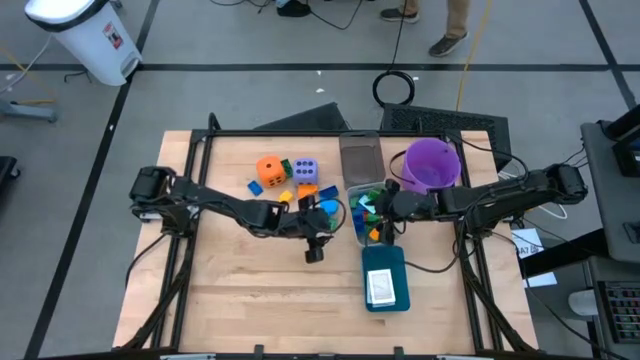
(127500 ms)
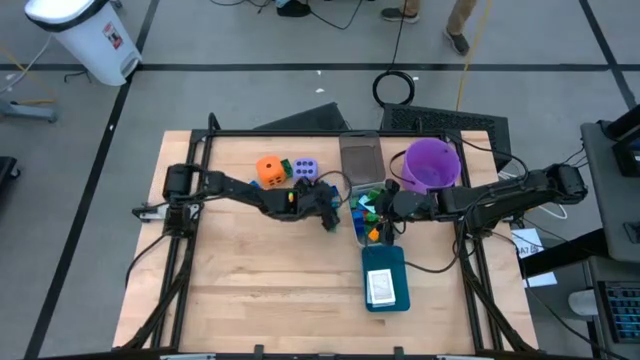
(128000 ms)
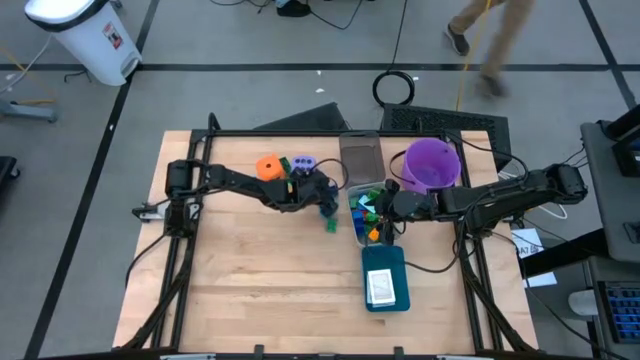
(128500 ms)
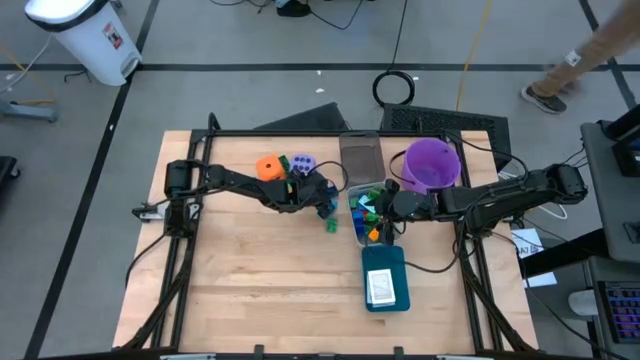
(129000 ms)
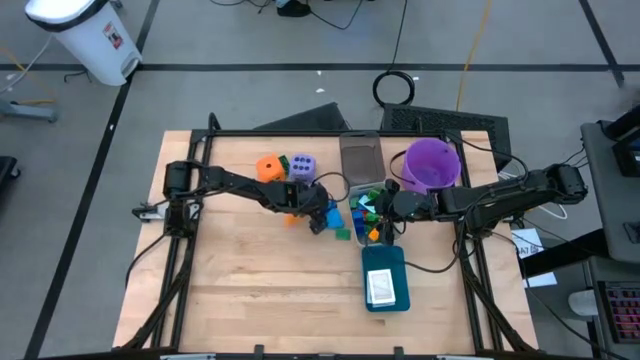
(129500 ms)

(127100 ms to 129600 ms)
Task: Pick & Place Toys
Adjust the game piece on the table

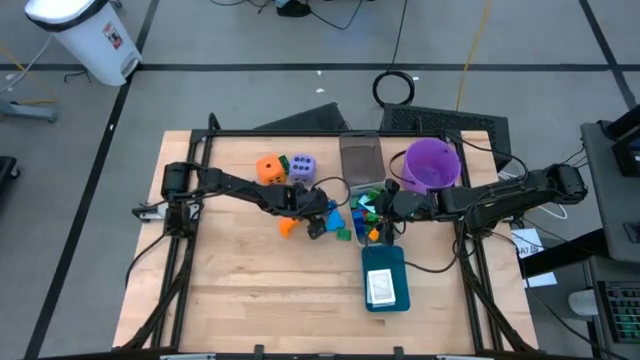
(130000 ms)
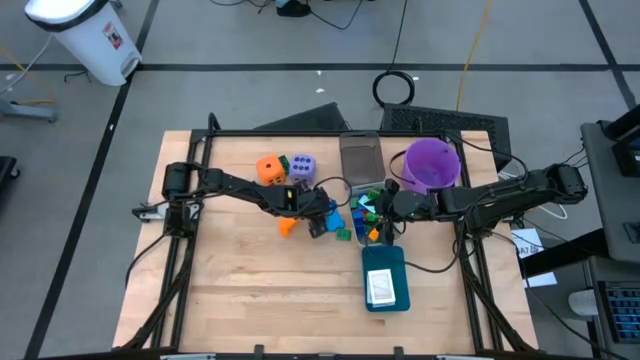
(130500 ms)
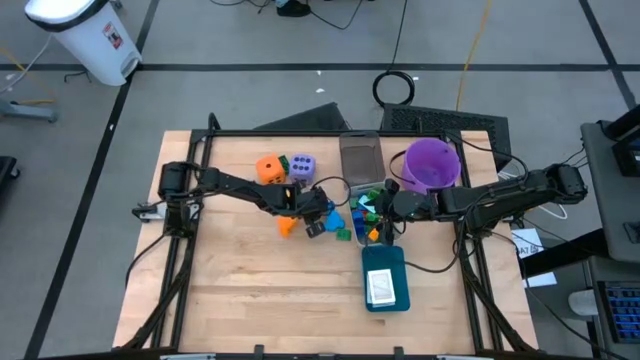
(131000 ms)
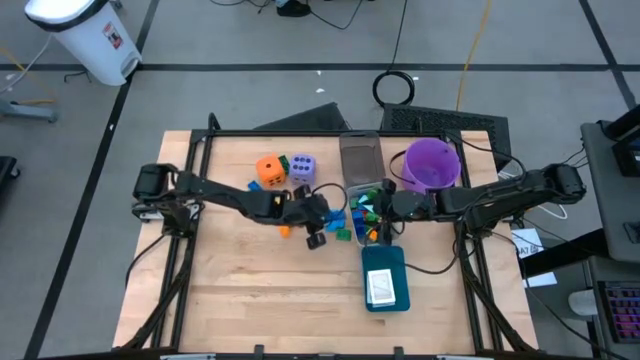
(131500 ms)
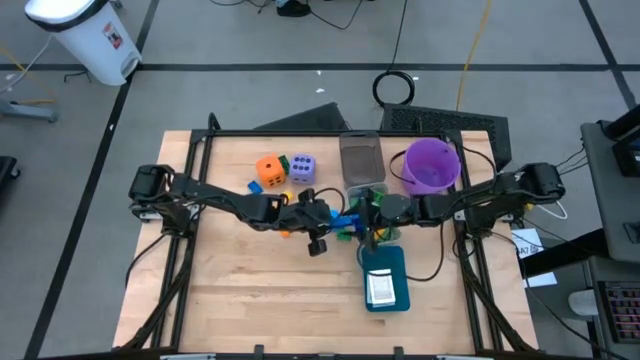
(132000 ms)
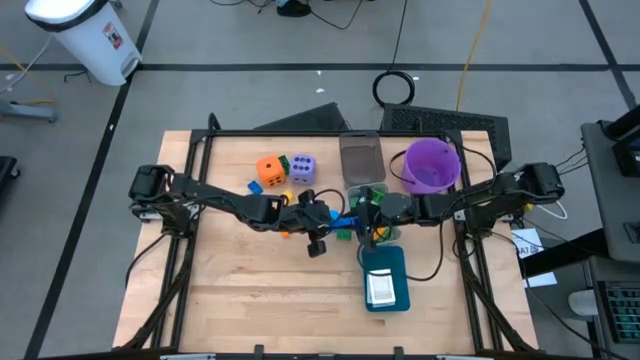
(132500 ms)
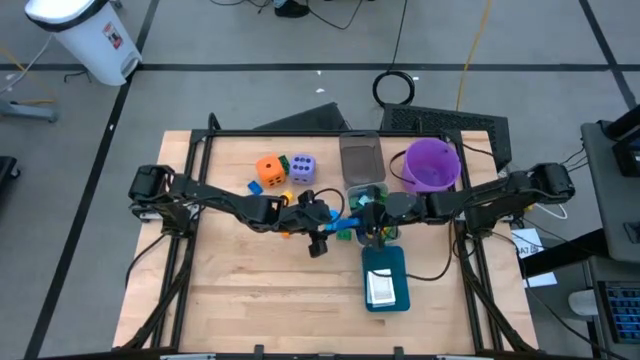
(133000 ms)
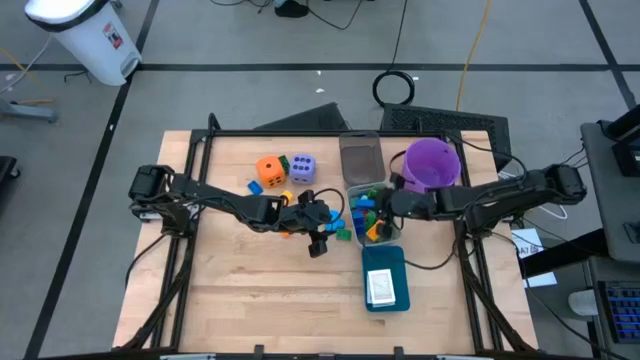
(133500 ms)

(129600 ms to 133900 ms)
Put the dark blue game piece into the gray bin

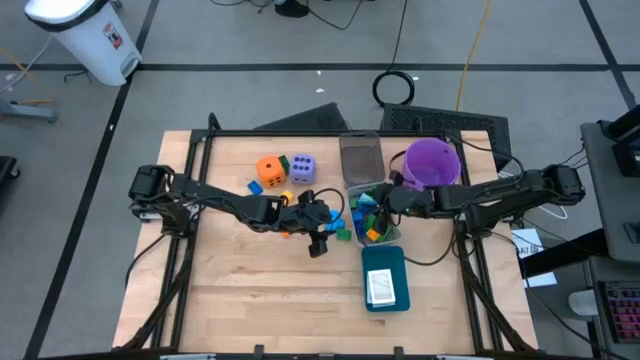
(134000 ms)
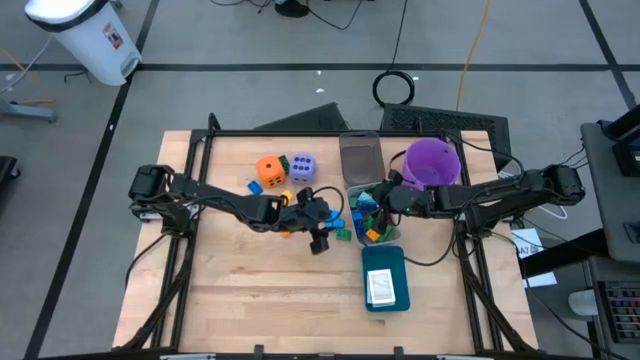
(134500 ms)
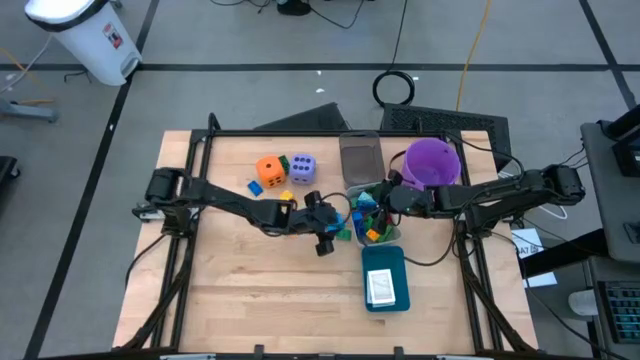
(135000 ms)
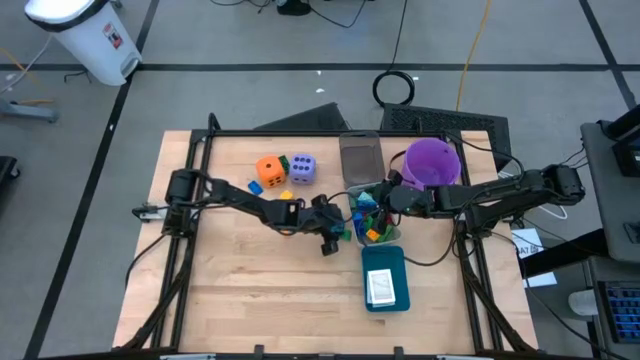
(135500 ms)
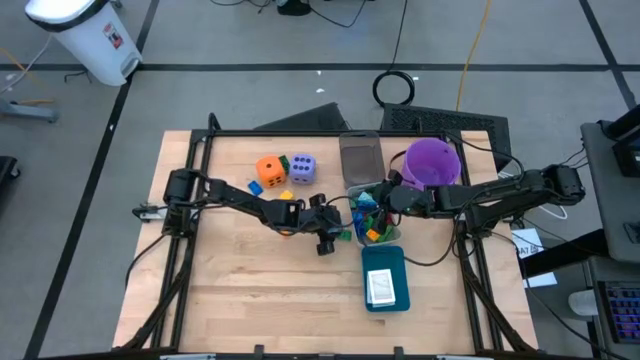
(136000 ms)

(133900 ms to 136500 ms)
Adjust the blue game piece on the table

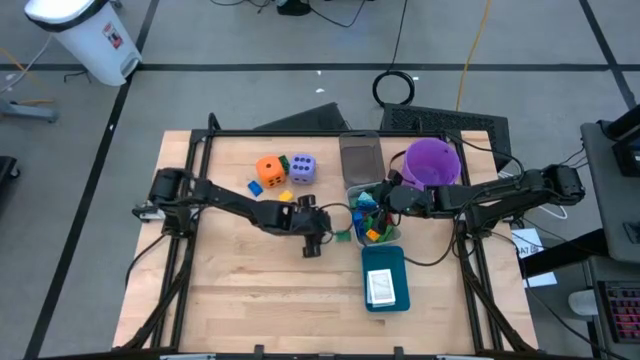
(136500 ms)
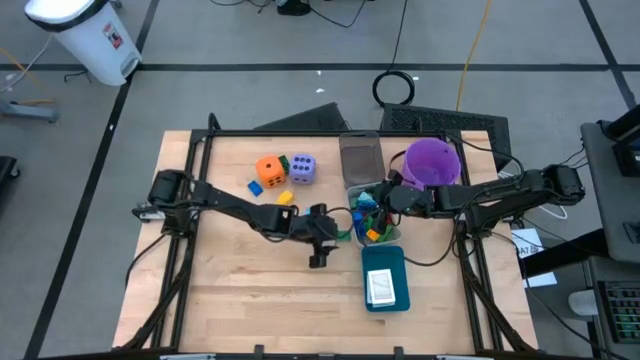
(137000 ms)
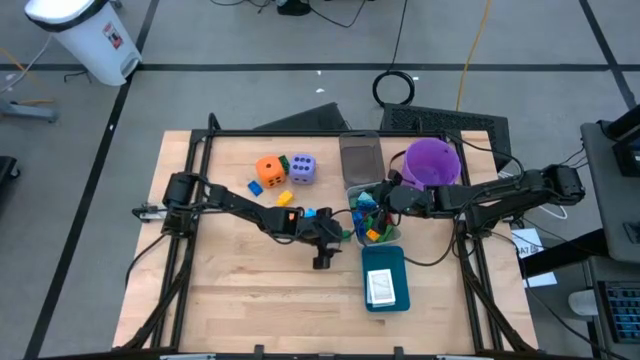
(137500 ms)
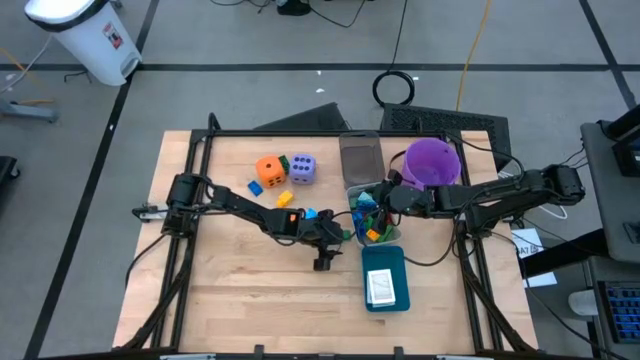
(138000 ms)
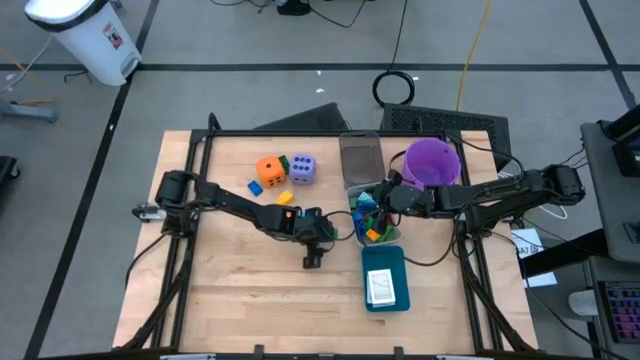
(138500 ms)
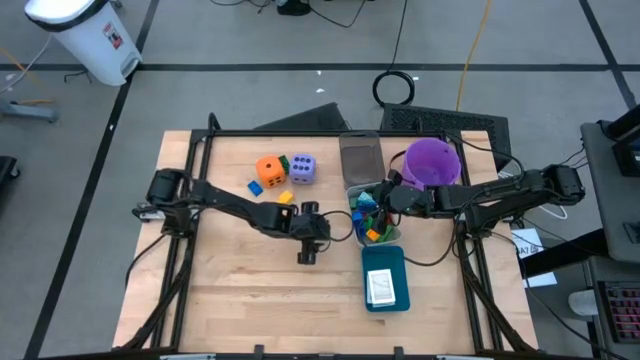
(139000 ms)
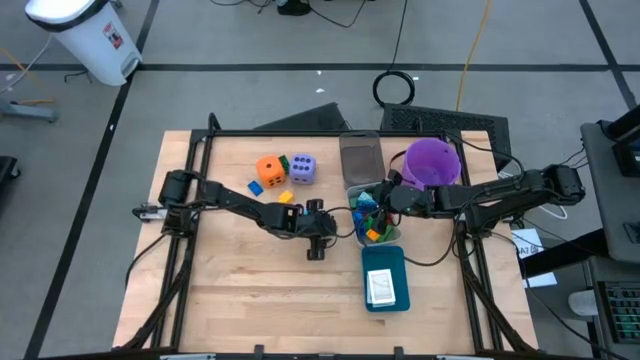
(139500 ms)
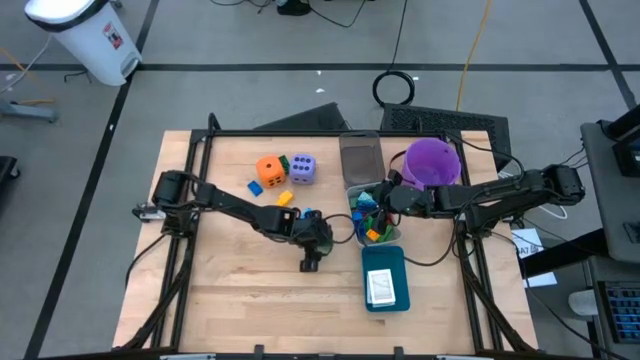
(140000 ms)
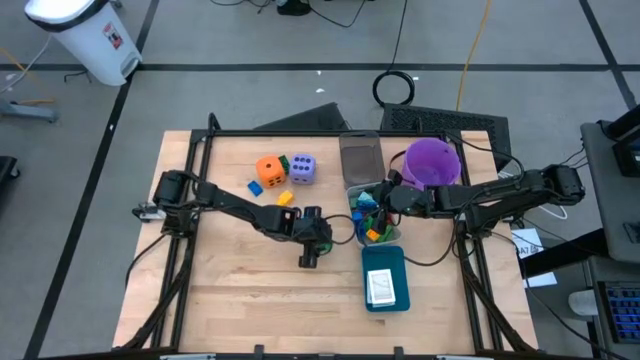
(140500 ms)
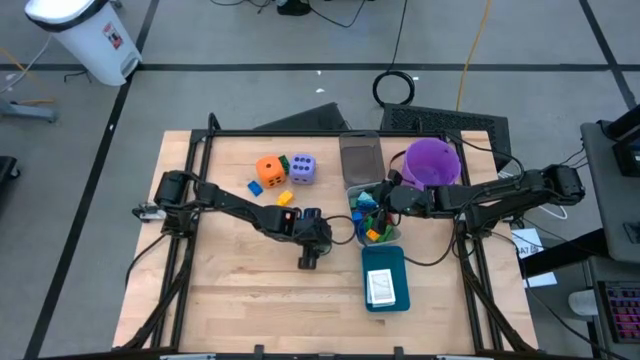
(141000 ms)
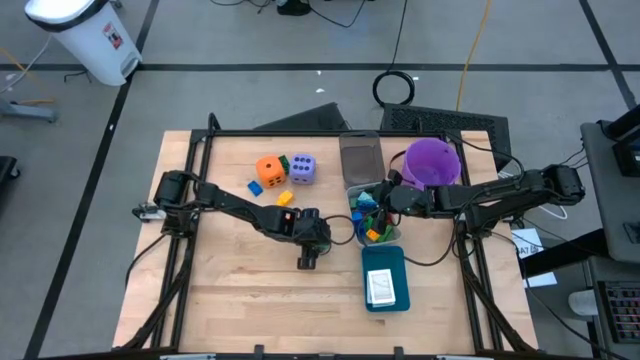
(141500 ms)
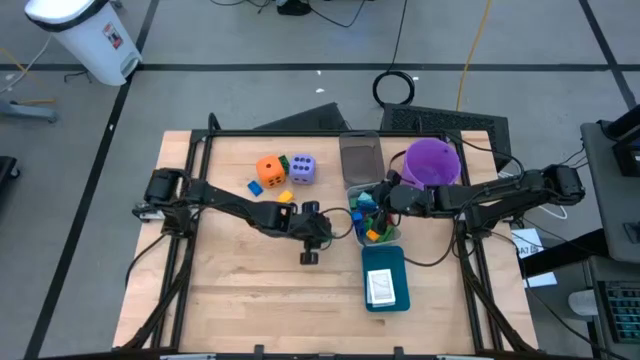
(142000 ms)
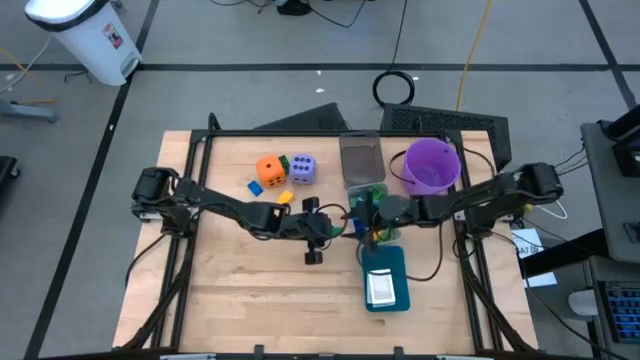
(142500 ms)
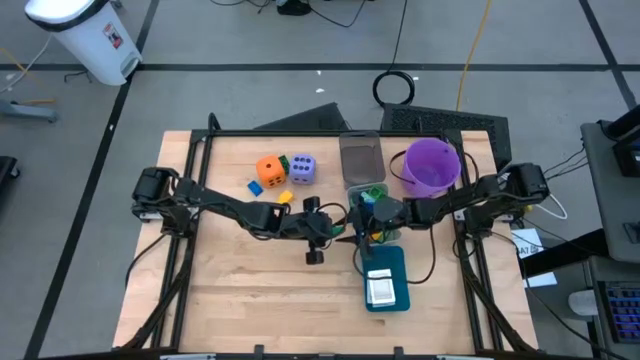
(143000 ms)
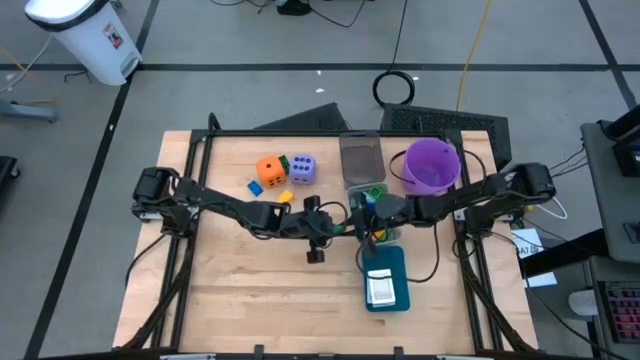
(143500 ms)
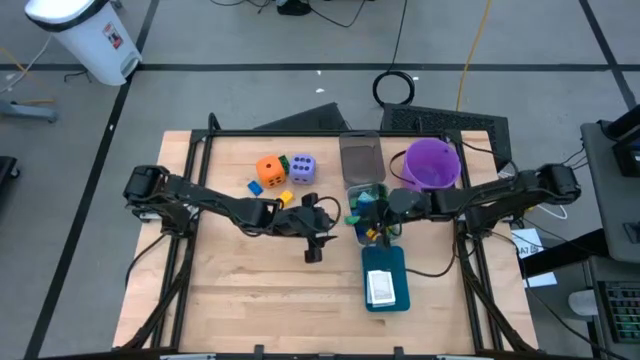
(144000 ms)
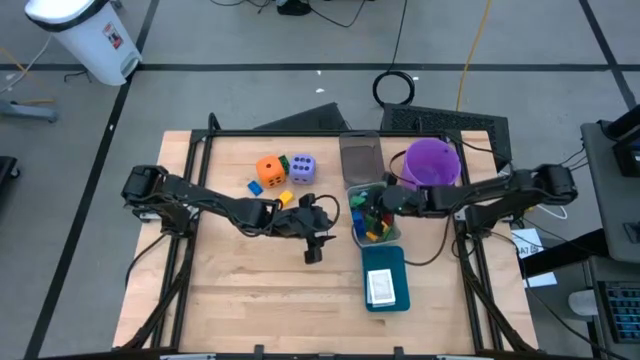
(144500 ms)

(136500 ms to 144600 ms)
Put the dark green game piece into the gray bin

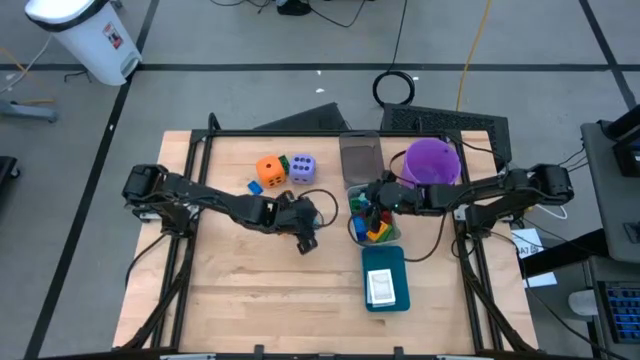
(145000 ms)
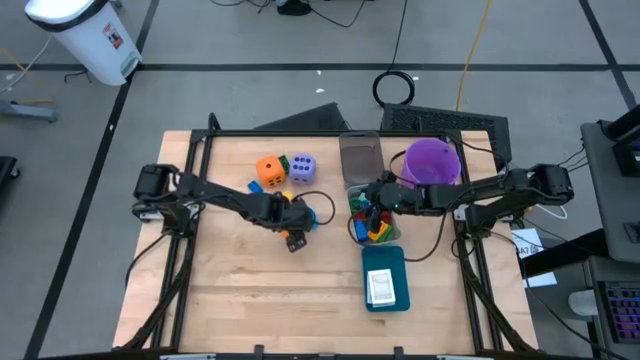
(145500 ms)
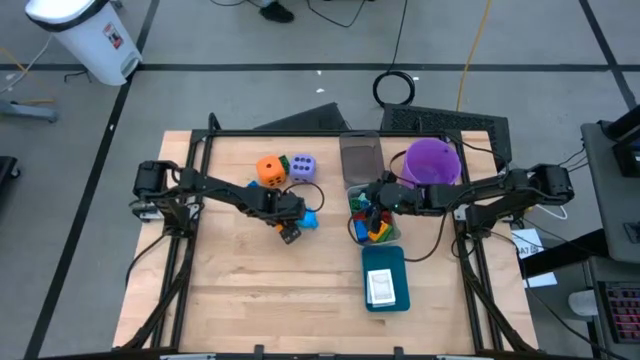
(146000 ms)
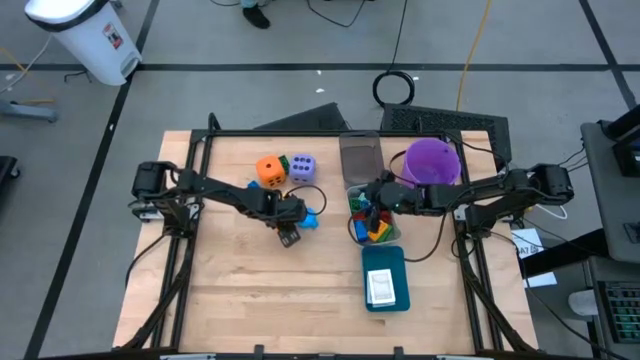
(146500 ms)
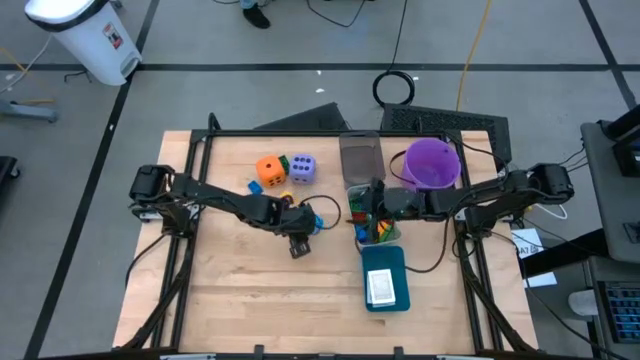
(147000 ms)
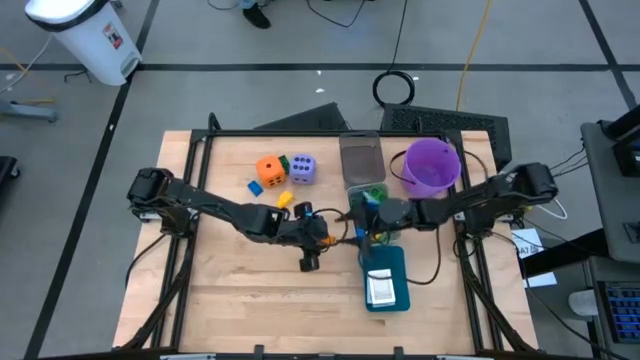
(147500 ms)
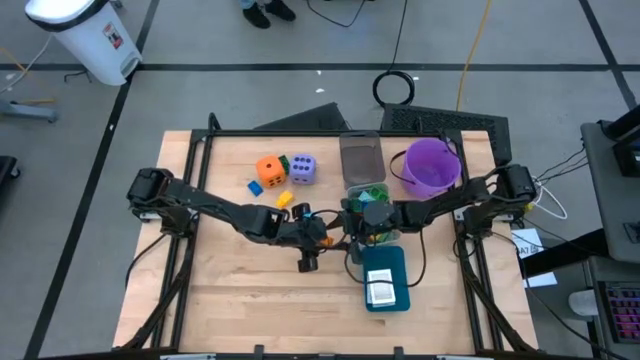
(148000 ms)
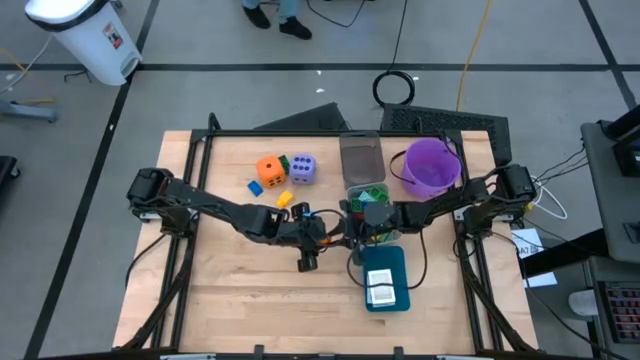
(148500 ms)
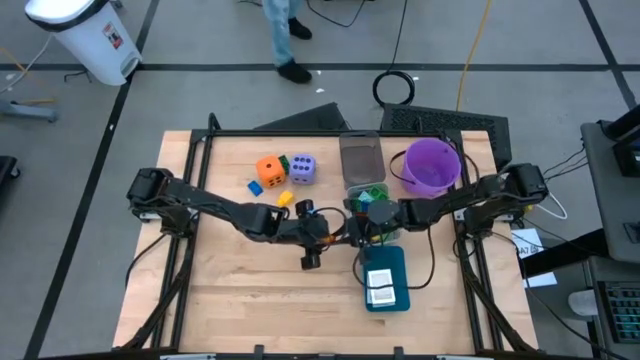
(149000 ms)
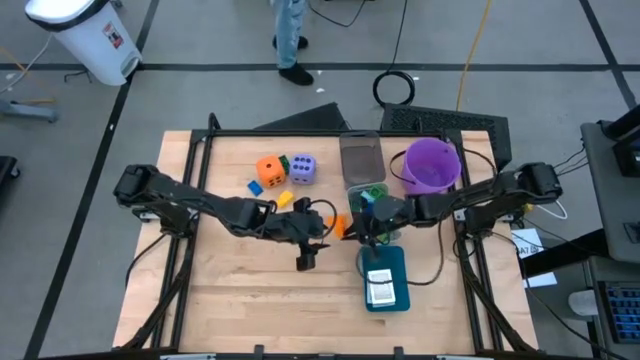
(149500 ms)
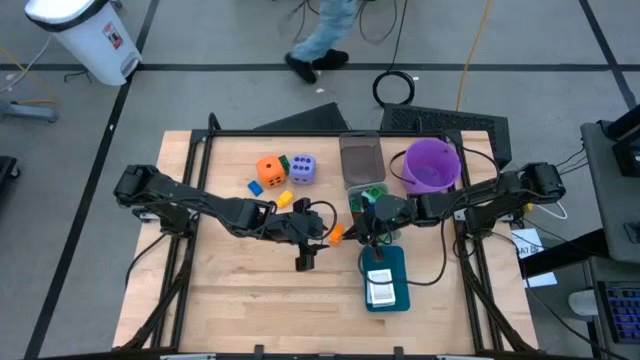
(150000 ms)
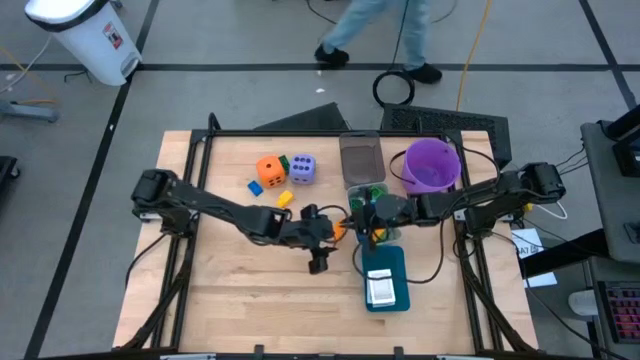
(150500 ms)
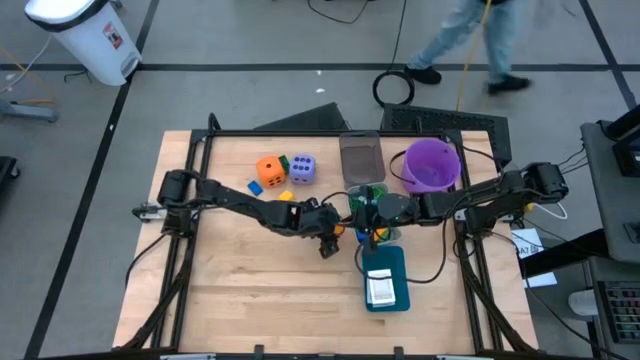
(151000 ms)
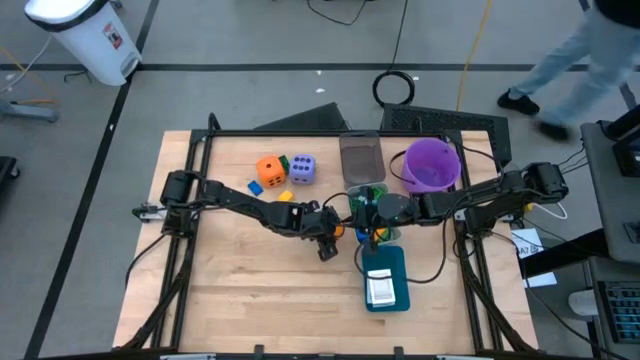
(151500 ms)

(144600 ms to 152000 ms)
Put the orange game piece into the gray bin
